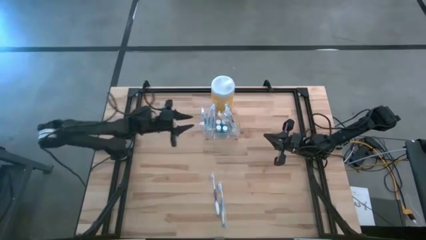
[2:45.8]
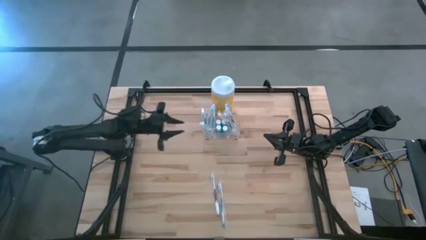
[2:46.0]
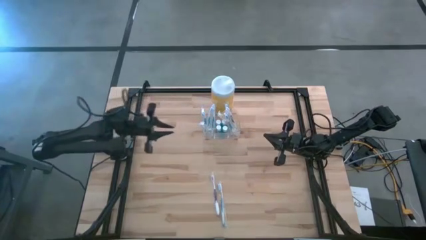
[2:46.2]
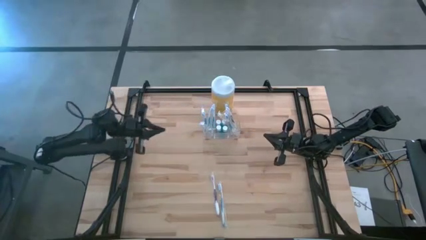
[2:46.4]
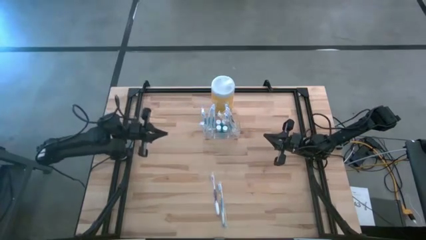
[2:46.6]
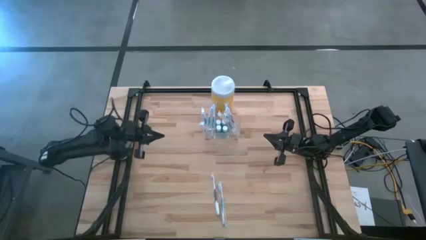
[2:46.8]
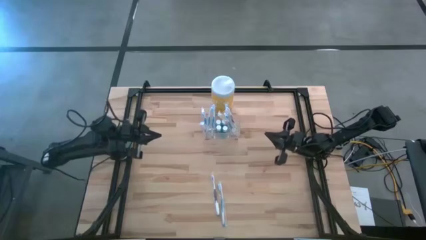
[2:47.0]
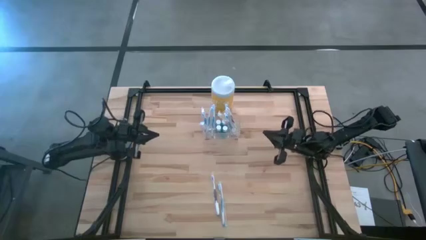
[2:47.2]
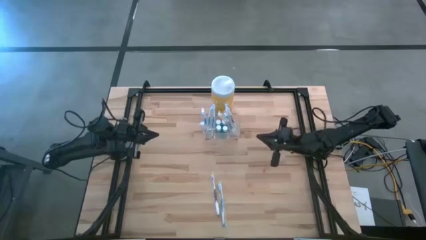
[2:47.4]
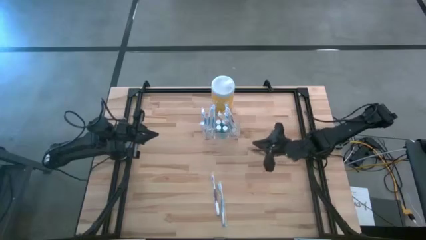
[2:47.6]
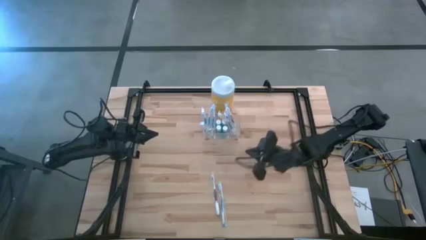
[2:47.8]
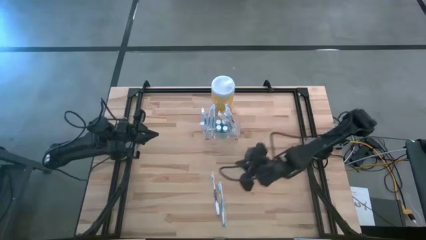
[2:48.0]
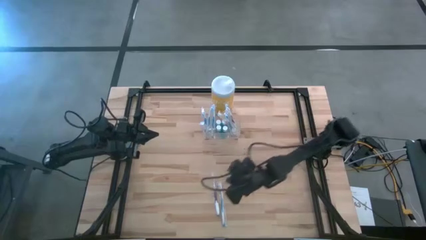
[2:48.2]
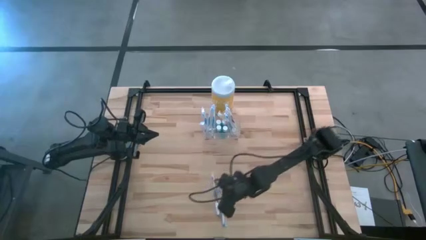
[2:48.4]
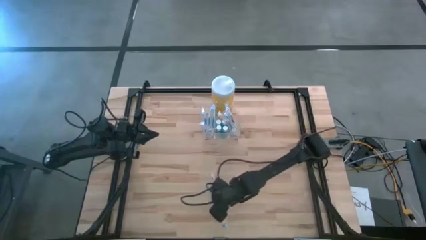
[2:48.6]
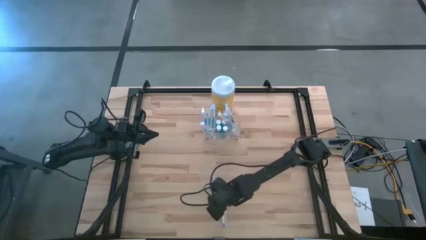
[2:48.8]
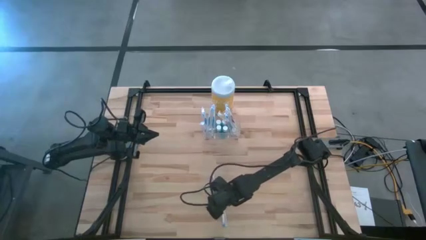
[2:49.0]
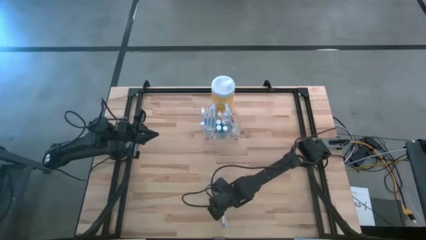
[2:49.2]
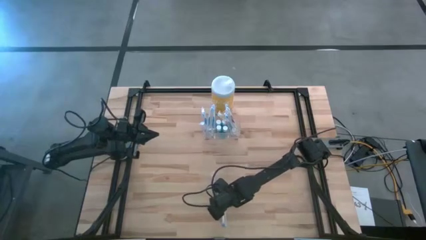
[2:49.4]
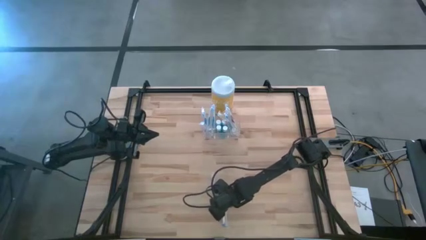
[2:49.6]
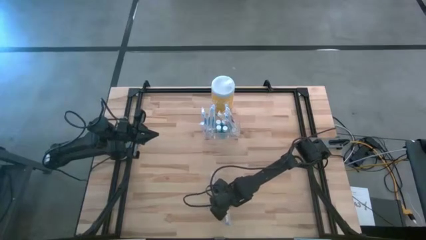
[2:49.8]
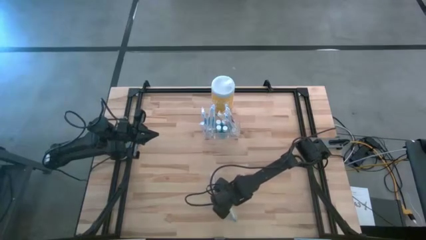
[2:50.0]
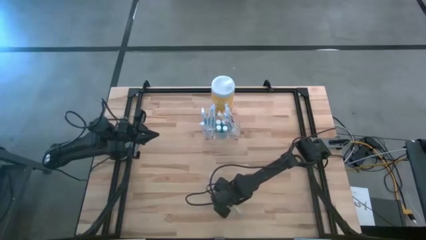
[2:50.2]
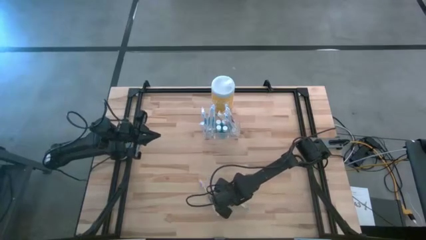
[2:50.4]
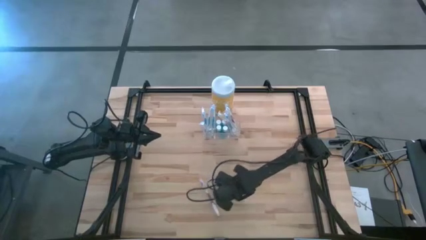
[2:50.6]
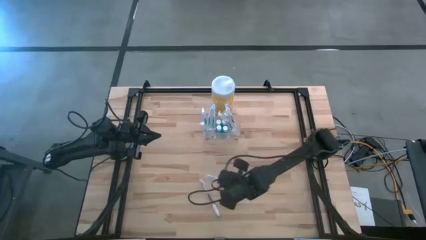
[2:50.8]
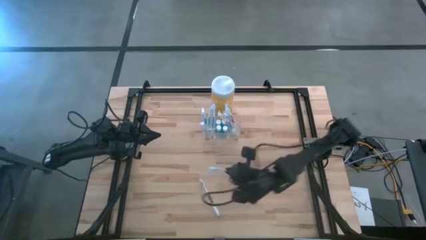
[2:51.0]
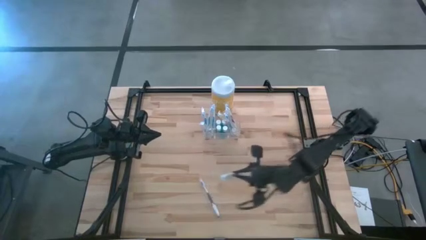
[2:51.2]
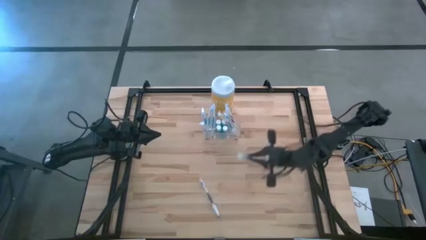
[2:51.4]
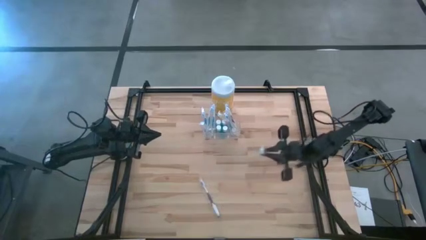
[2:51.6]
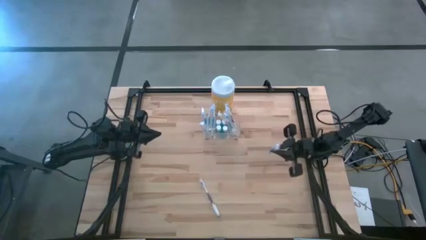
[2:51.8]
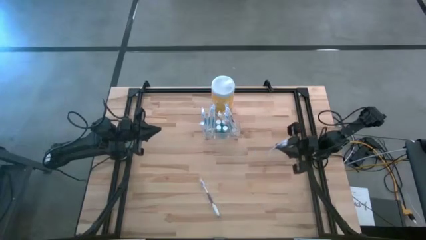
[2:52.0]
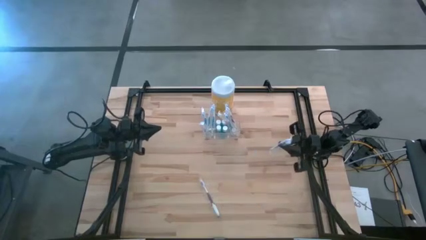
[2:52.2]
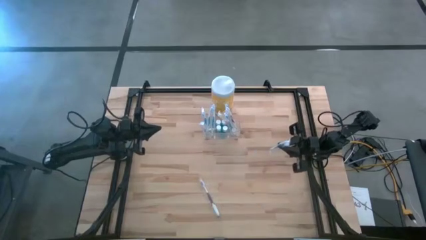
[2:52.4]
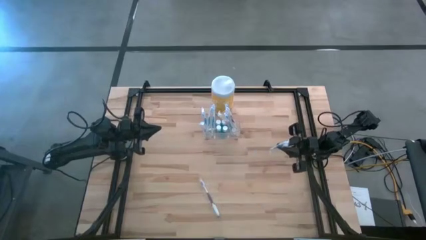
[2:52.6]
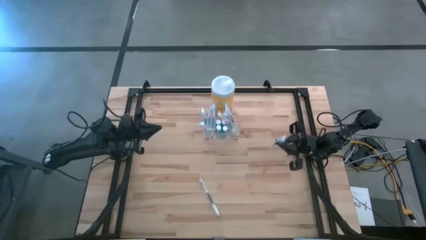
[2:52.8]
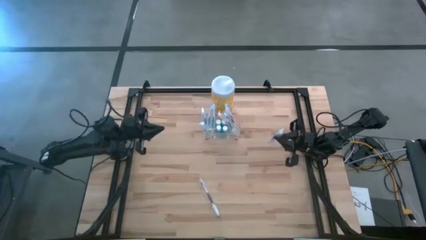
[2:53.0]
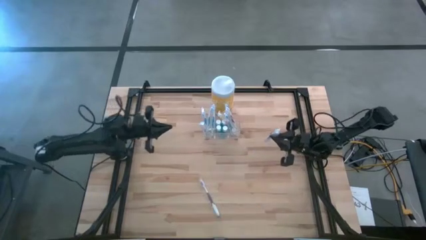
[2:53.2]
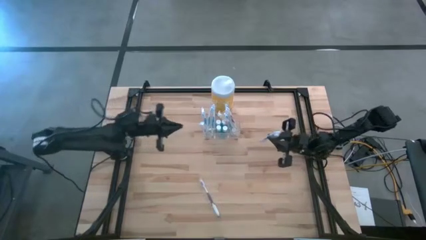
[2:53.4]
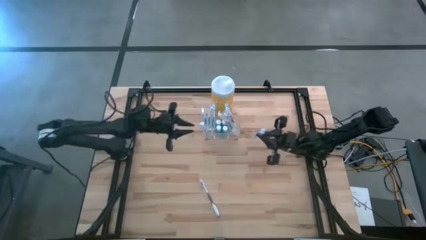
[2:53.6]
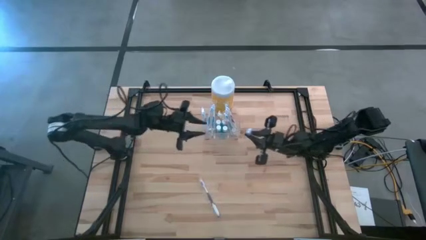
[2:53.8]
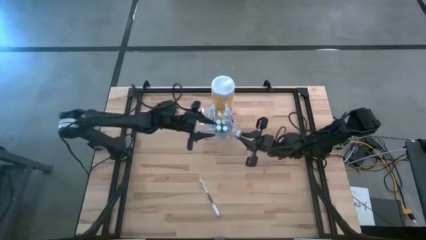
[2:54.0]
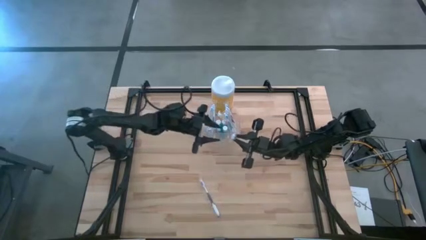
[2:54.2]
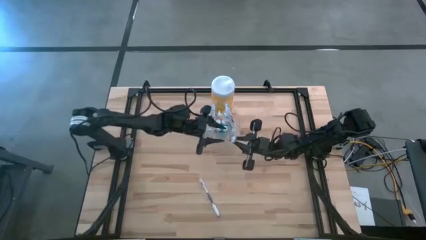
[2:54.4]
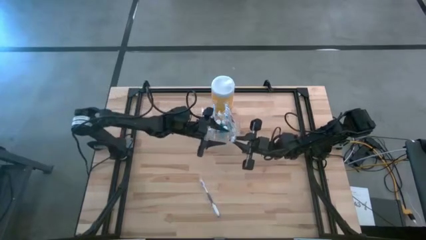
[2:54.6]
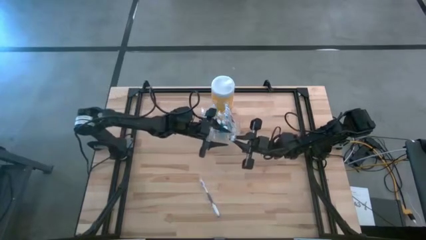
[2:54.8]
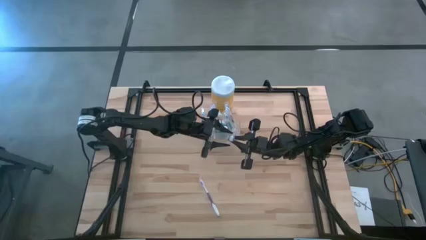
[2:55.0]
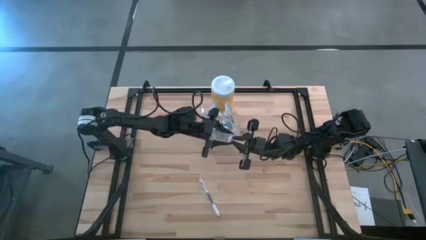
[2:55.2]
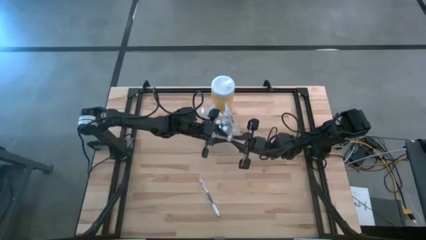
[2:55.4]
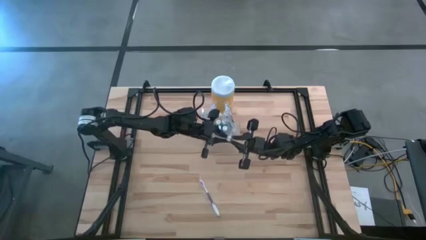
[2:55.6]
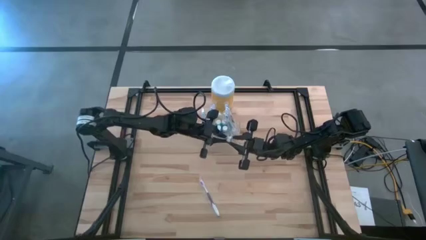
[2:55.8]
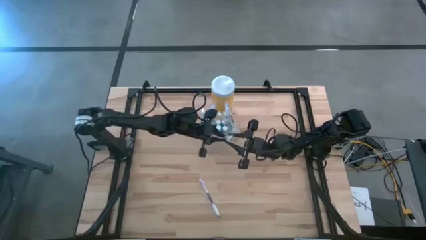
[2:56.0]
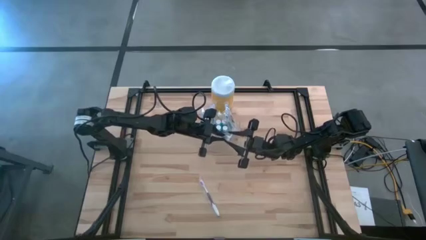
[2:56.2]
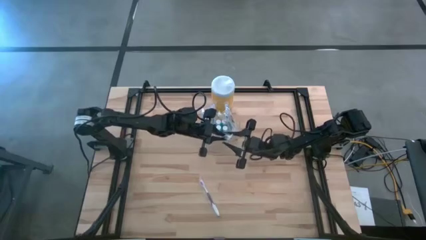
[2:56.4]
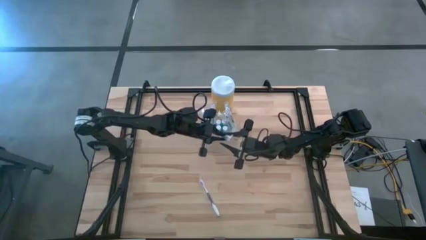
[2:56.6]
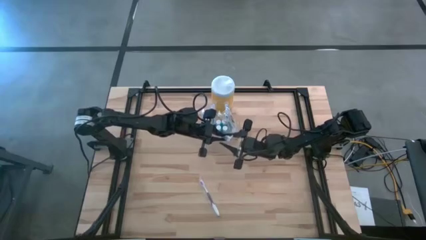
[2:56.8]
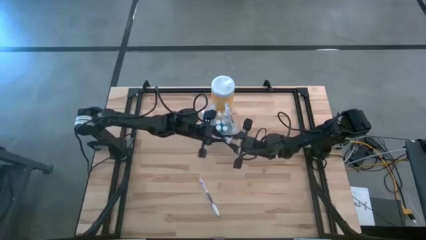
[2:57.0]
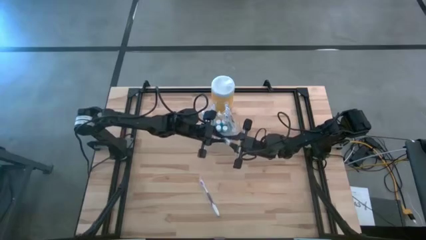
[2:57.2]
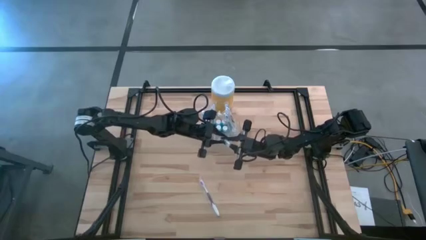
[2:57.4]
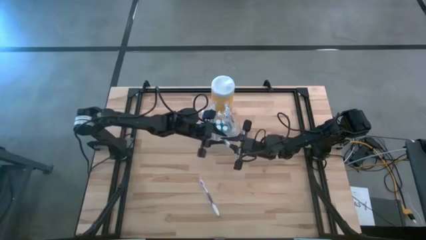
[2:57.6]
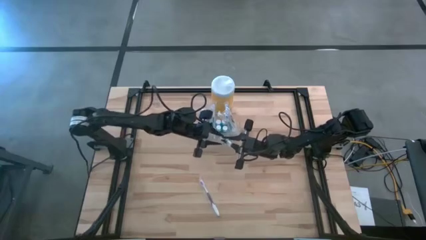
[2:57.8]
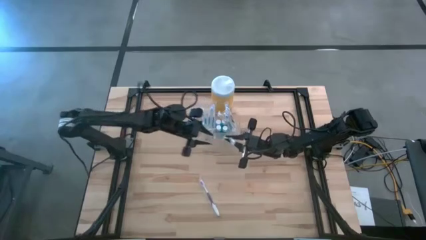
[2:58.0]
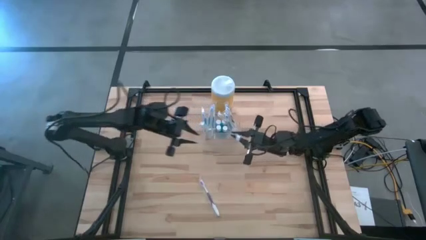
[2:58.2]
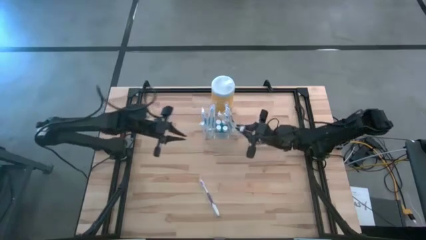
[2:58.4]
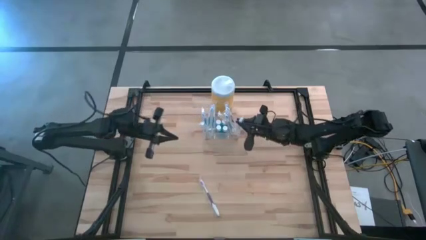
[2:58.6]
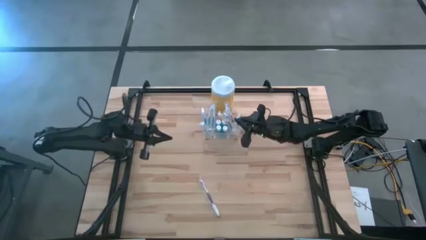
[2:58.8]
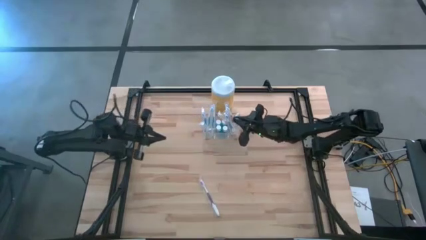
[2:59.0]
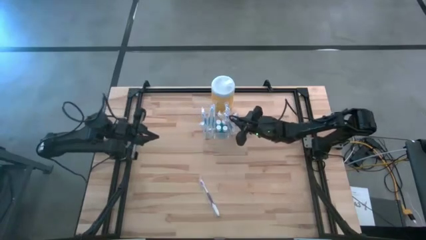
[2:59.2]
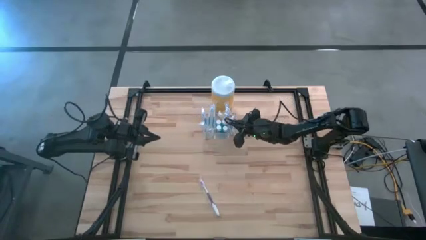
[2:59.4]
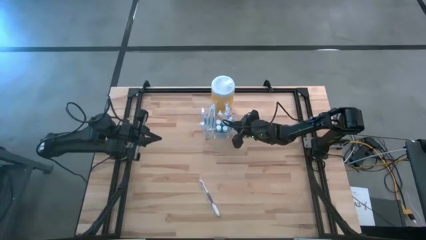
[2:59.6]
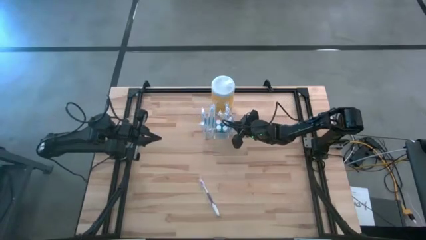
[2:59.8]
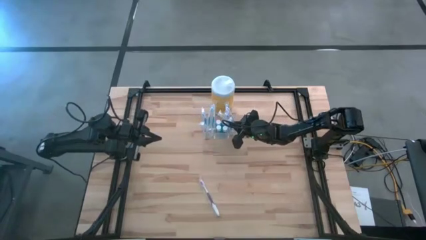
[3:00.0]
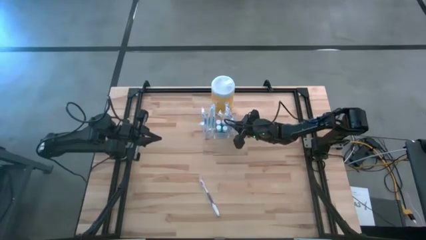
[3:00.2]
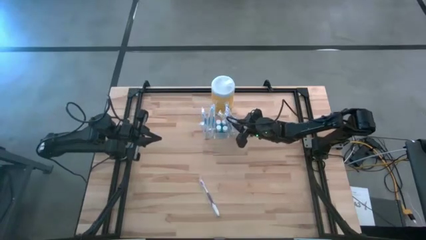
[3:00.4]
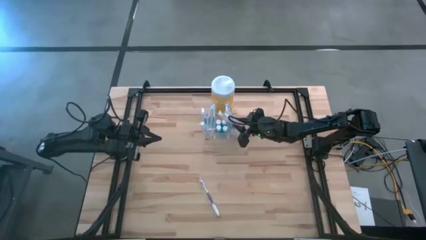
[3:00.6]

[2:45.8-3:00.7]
Task: Pick & Place toothbrushing station
Put the blue toothbrush into the transparent organizer

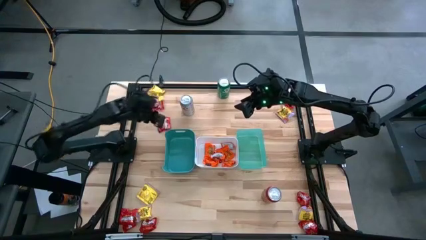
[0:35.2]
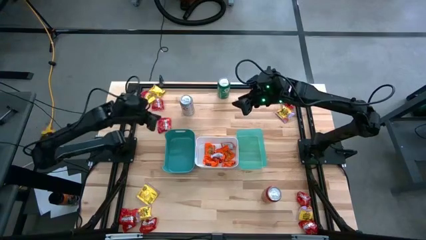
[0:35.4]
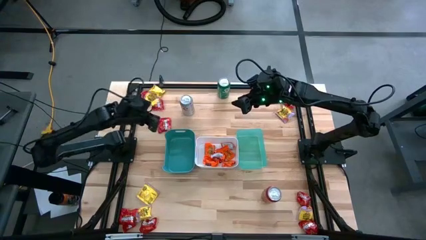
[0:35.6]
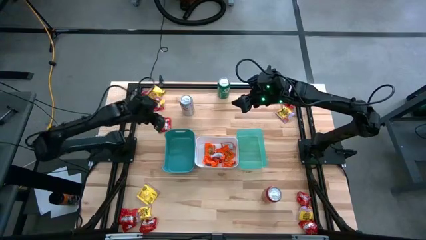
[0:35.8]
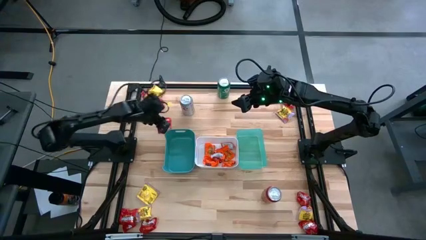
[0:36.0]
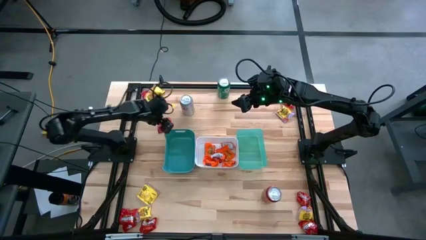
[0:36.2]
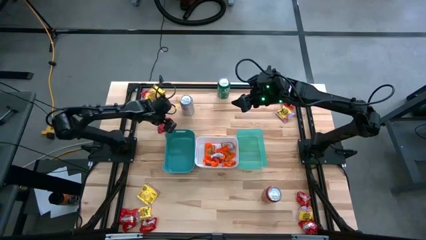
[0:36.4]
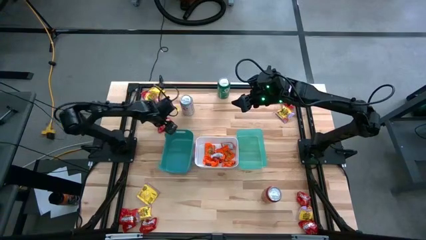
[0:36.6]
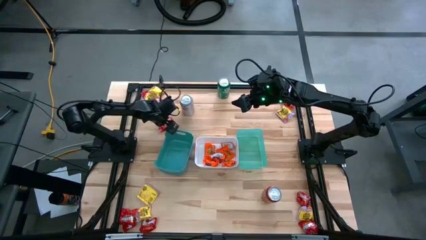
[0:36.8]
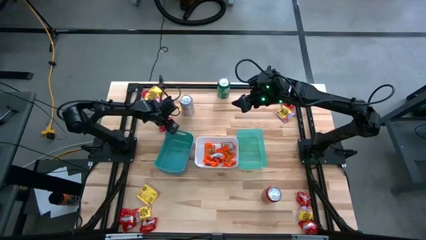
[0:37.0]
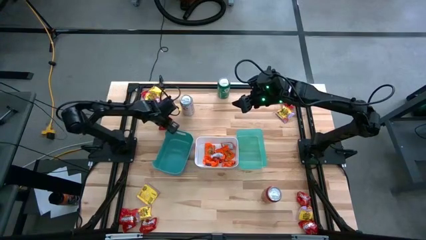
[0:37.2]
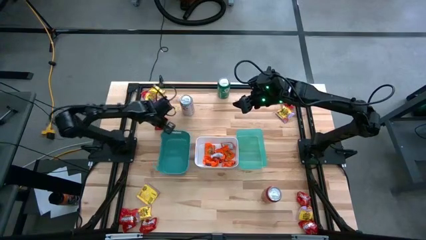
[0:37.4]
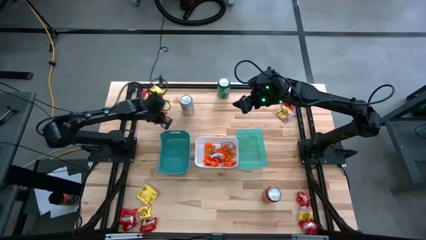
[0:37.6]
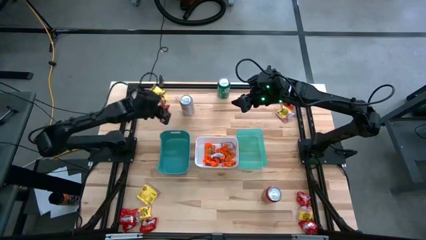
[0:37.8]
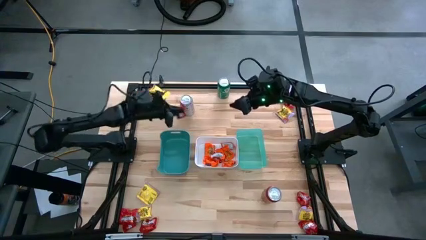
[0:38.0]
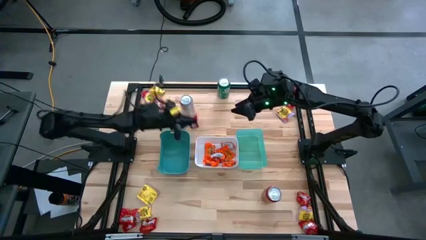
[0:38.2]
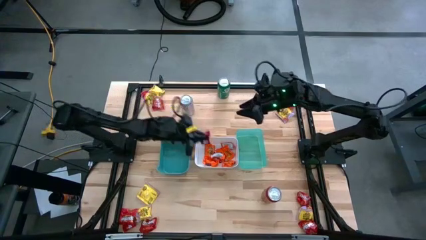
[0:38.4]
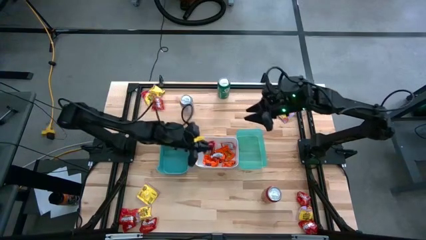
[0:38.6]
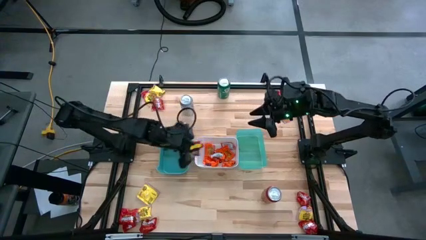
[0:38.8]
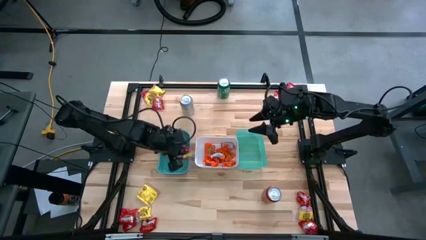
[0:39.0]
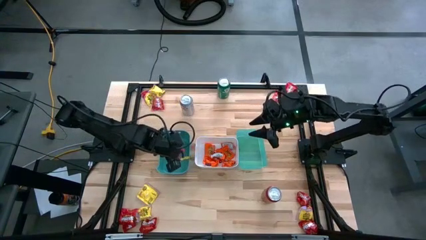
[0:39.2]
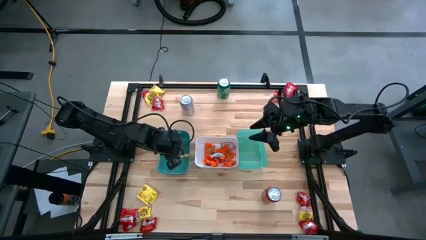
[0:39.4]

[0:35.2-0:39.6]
Task: Sort candy
Put the red candy into the green bin
